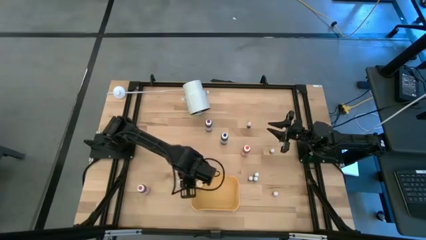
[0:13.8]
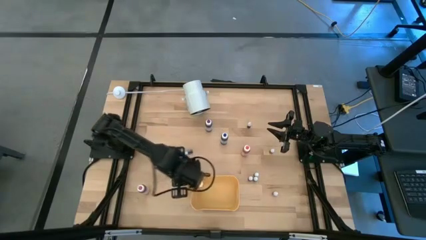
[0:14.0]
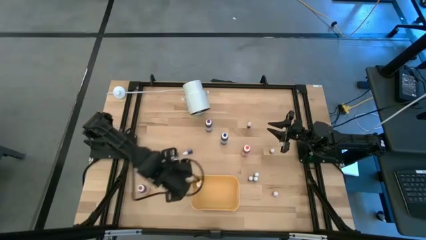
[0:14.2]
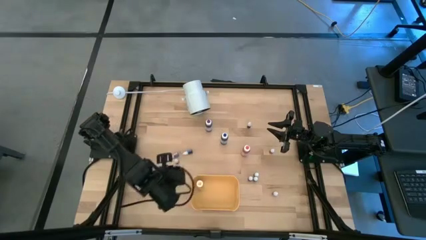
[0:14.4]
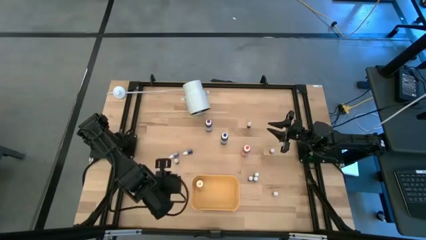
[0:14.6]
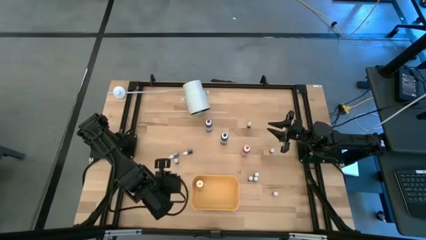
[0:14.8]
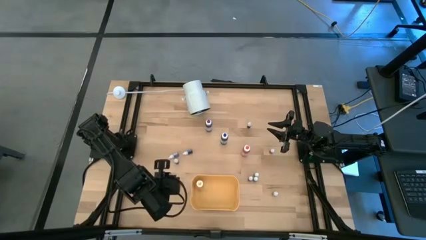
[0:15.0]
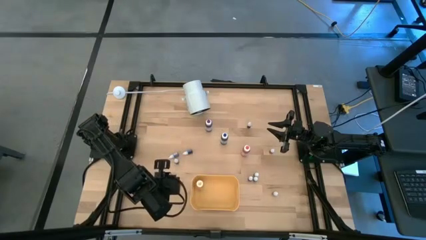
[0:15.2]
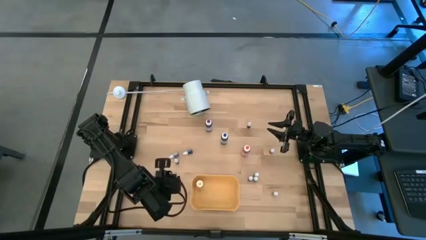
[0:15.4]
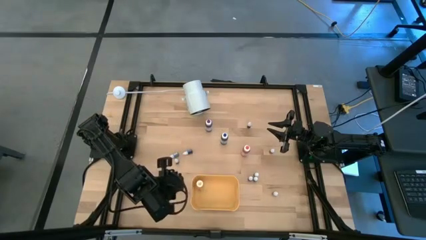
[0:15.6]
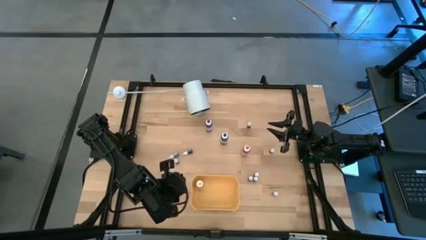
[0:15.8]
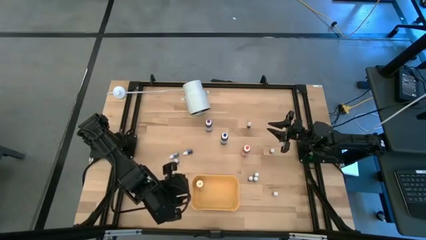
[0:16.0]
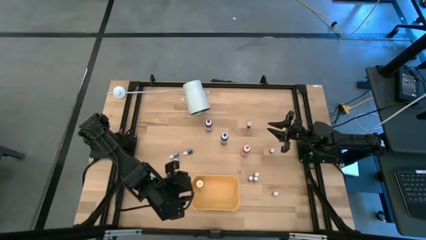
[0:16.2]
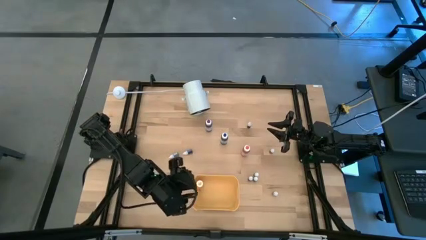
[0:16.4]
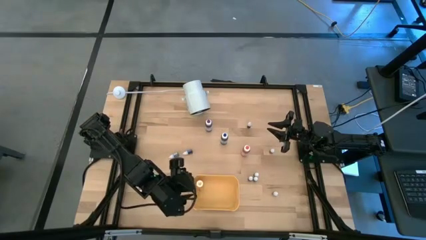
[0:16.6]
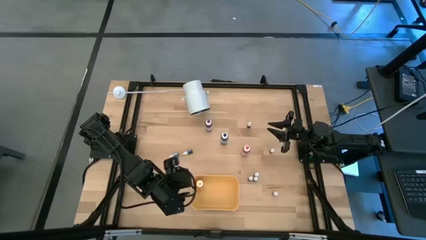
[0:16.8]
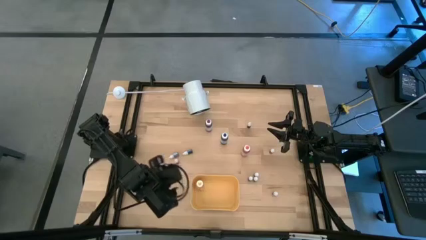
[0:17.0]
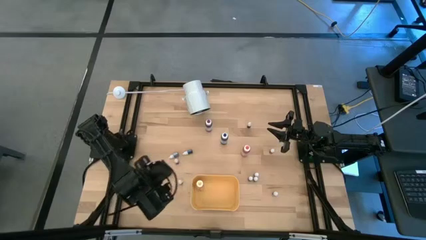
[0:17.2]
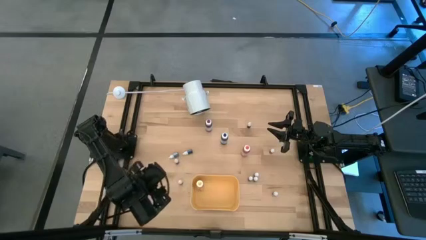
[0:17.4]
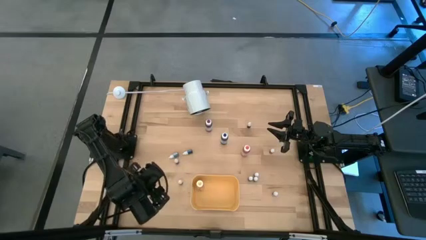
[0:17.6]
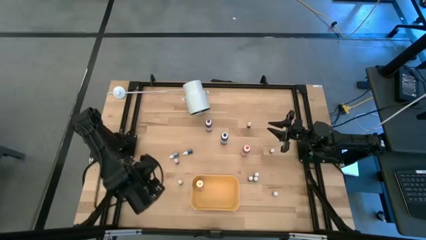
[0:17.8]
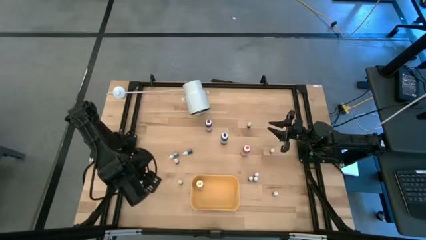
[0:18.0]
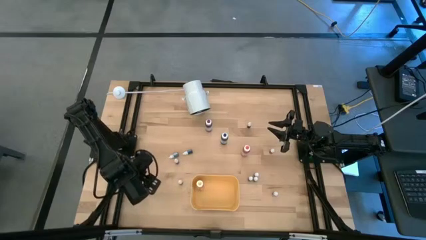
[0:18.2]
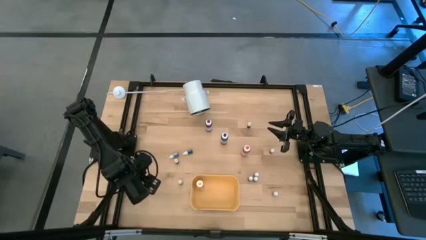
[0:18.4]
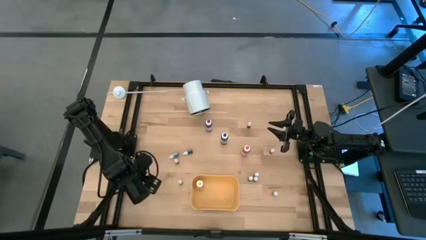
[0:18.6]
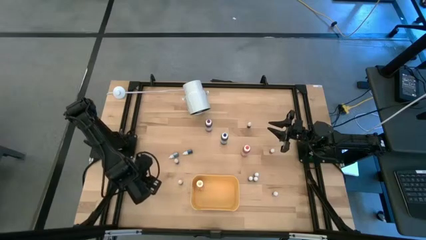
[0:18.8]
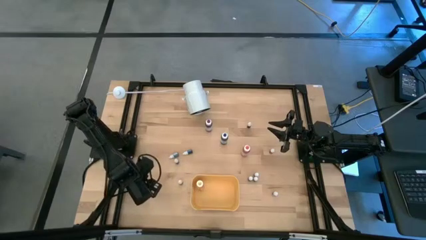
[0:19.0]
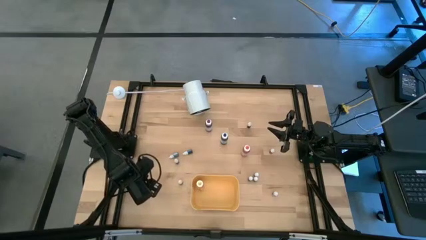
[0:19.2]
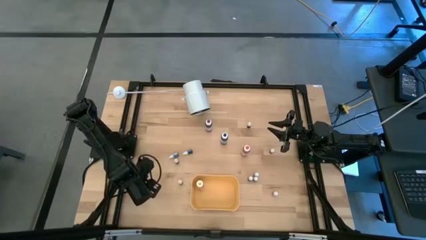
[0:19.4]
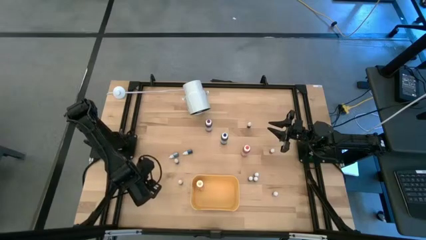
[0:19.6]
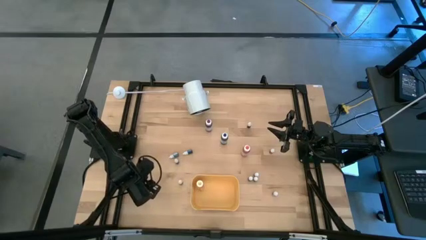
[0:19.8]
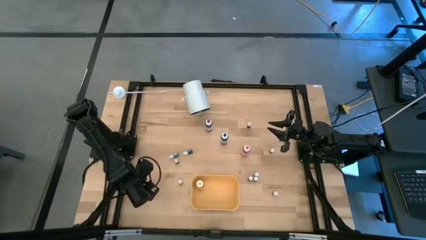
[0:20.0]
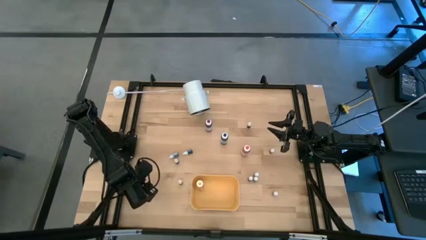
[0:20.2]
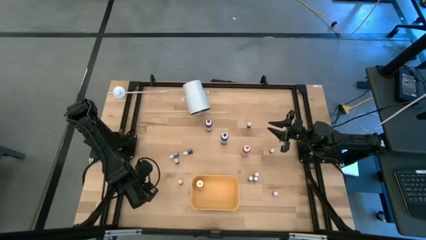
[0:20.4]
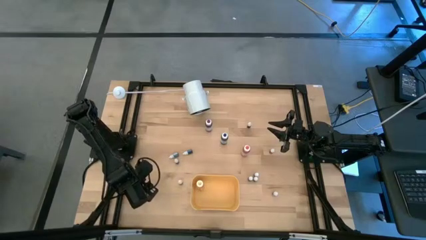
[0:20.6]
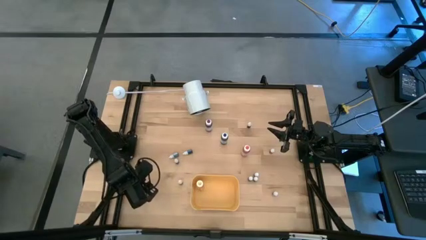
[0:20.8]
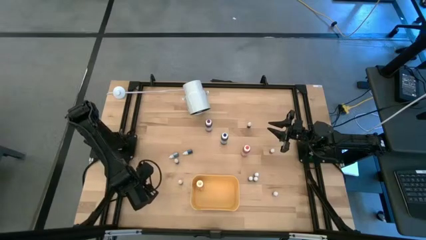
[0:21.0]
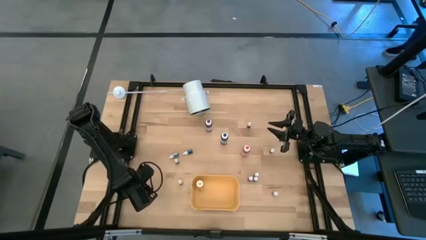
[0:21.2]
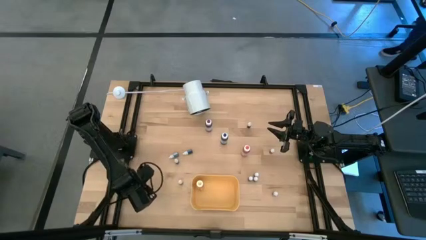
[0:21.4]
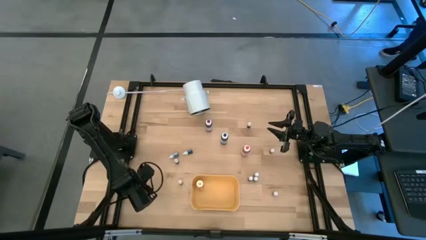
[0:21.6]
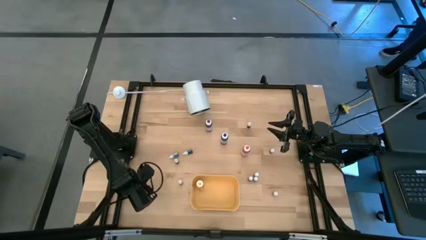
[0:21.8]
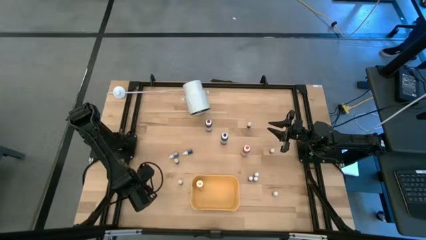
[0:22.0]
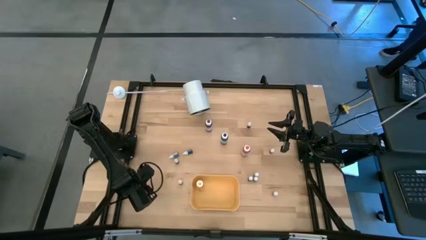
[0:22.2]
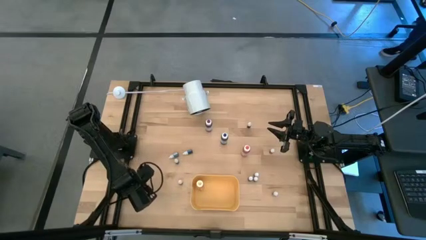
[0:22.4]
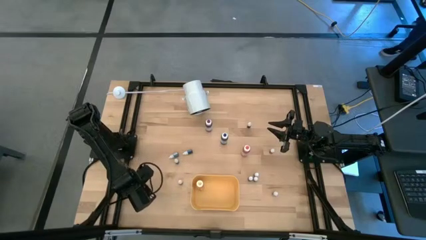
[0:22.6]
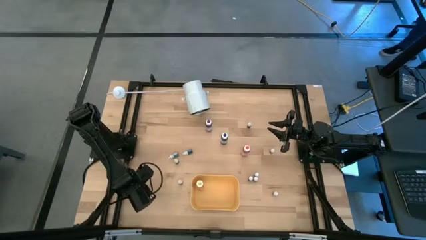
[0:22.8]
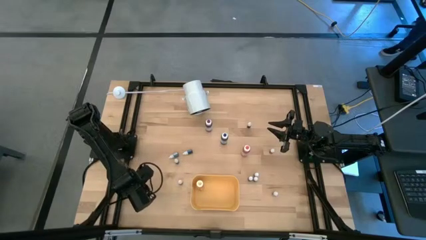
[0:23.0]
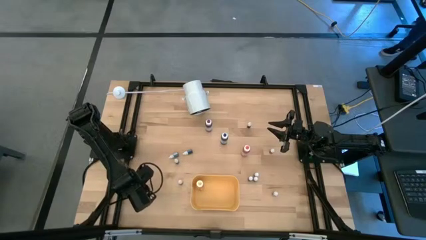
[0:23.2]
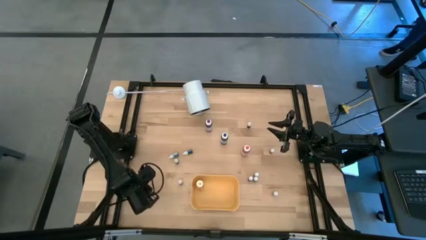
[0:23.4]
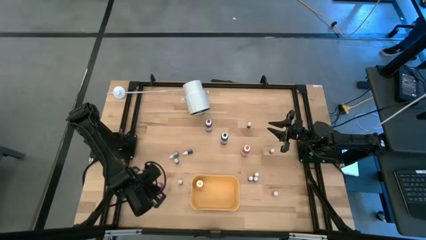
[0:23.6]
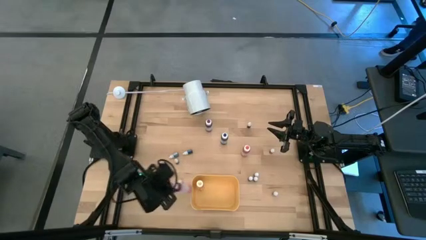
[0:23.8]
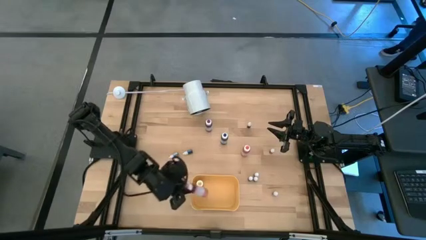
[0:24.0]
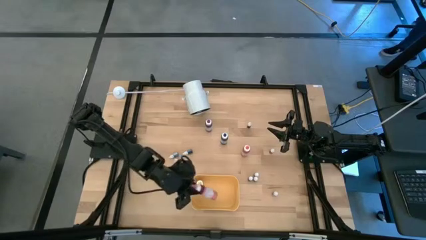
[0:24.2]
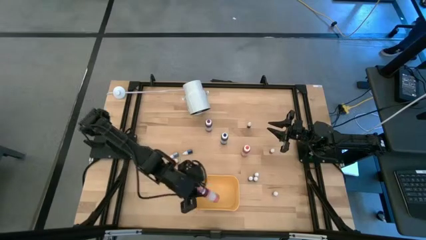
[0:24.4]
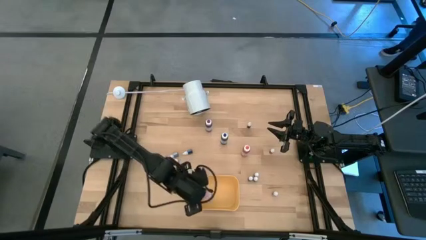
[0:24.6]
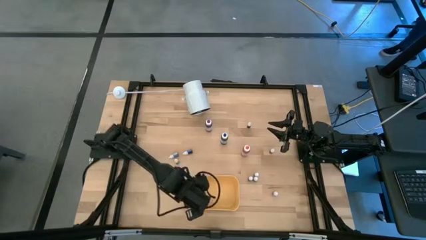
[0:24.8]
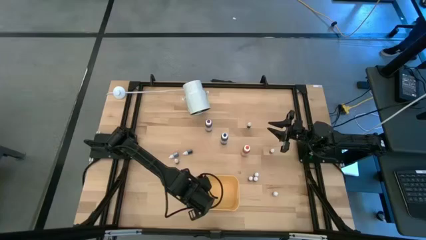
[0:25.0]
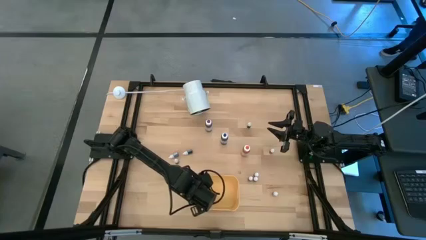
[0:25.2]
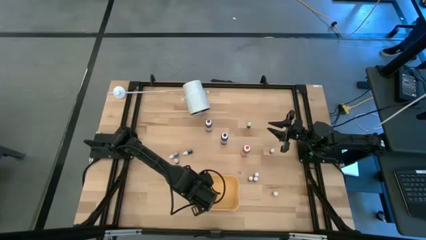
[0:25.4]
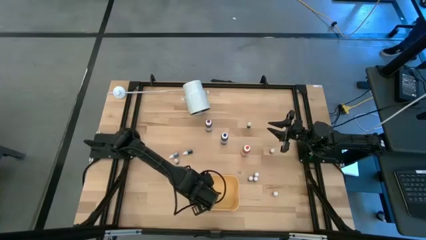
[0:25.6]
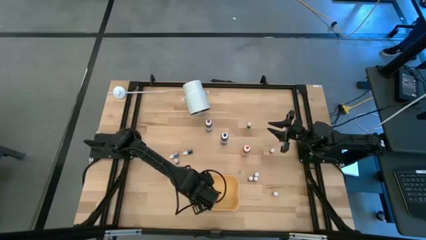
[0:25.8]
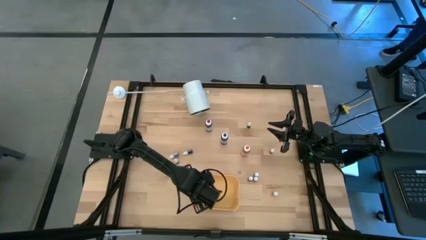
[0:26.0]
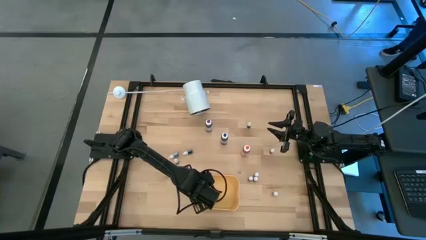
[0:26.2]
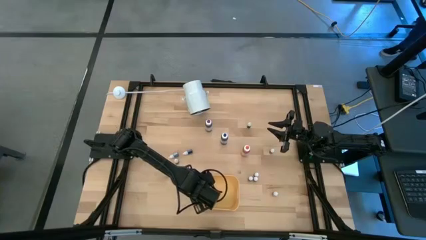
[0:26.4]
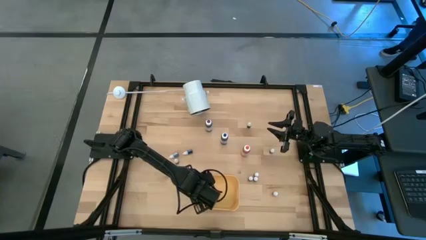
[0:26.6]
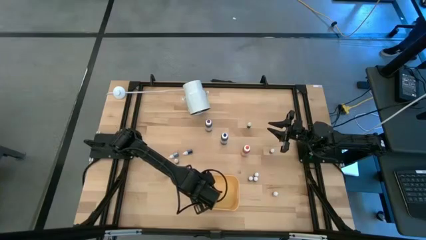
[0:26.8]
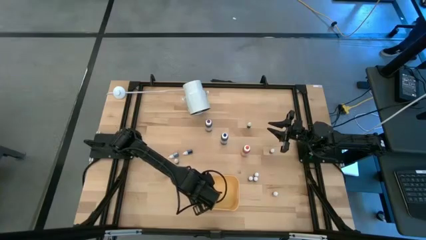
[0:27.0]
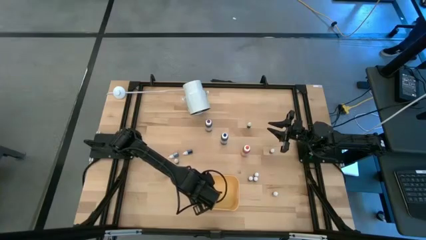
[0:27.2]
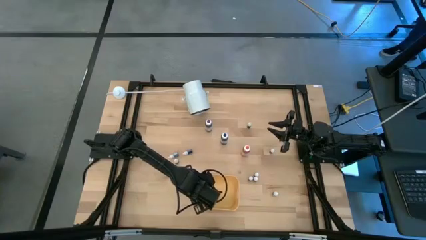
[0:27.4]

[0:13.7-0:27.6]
Task: Pick & Place food coloring
Put the big pink food coloring bottle into the yellow bin
